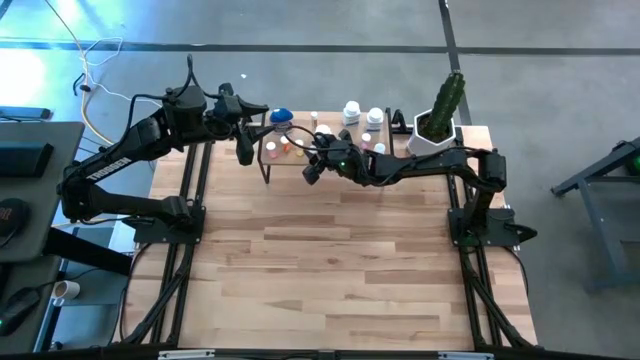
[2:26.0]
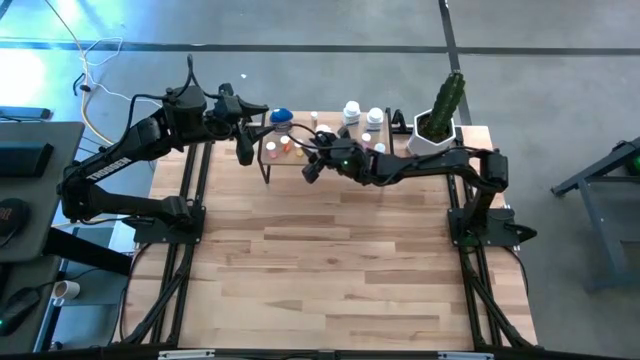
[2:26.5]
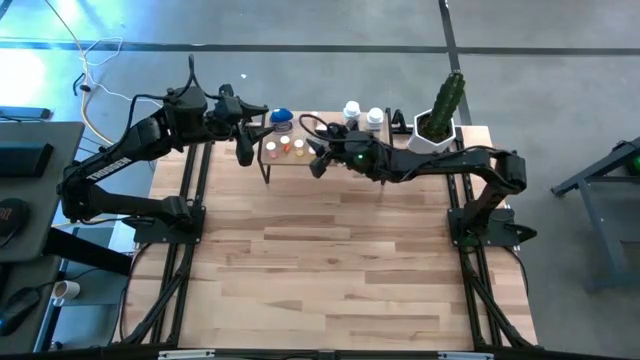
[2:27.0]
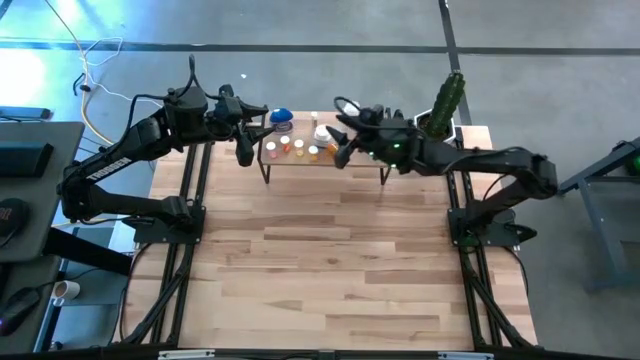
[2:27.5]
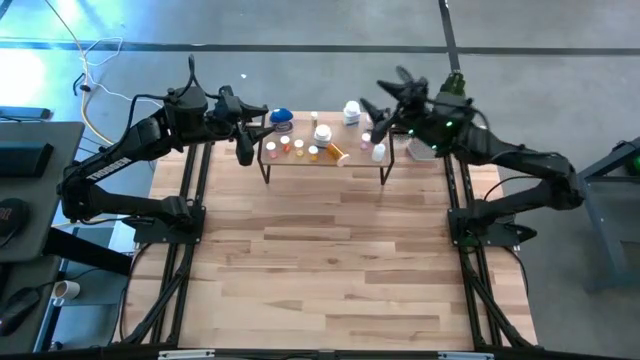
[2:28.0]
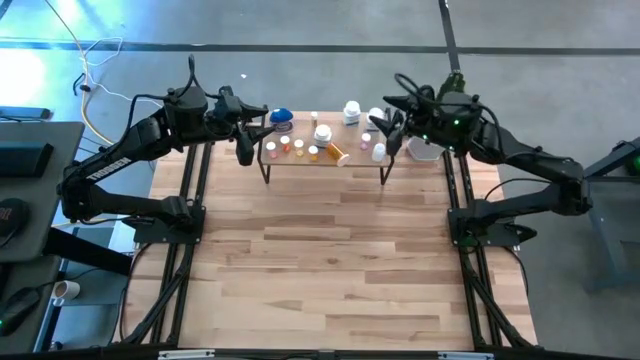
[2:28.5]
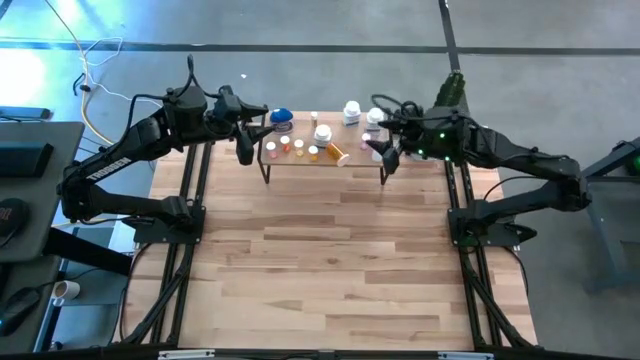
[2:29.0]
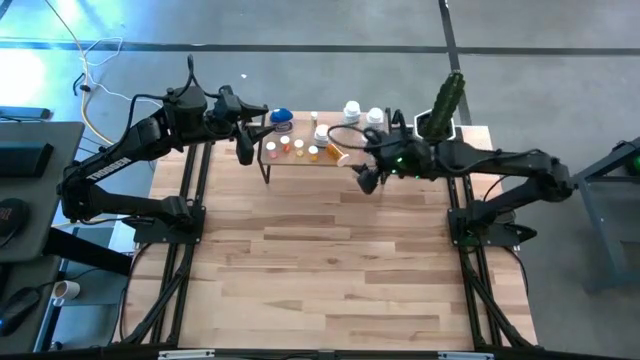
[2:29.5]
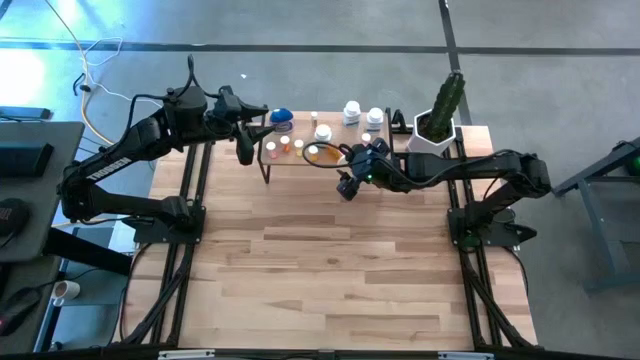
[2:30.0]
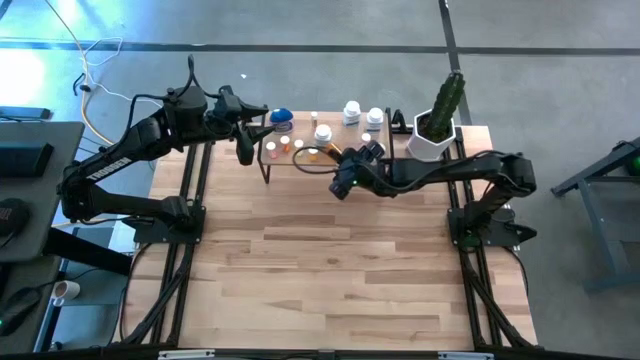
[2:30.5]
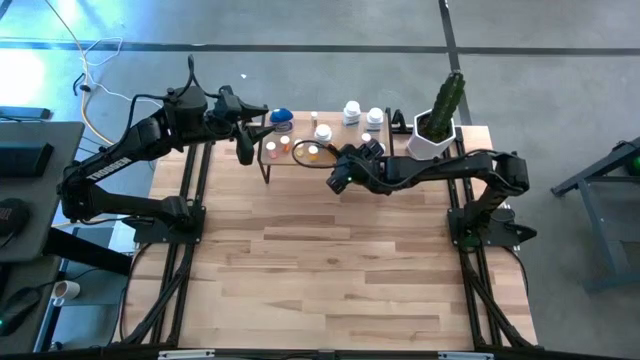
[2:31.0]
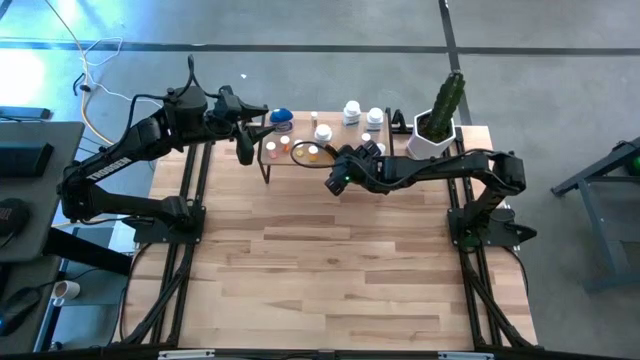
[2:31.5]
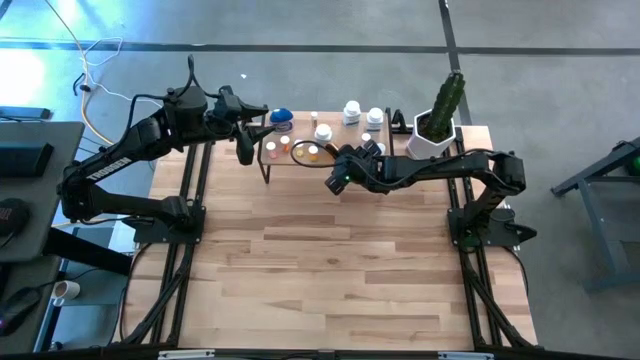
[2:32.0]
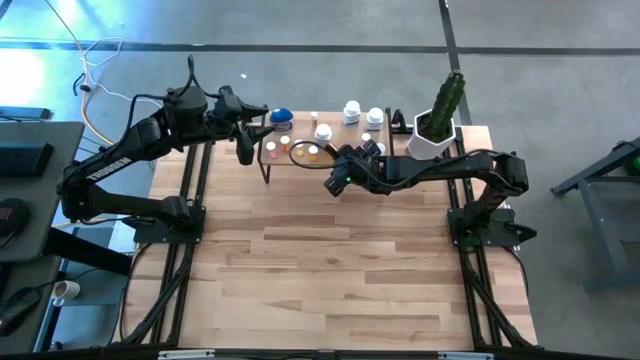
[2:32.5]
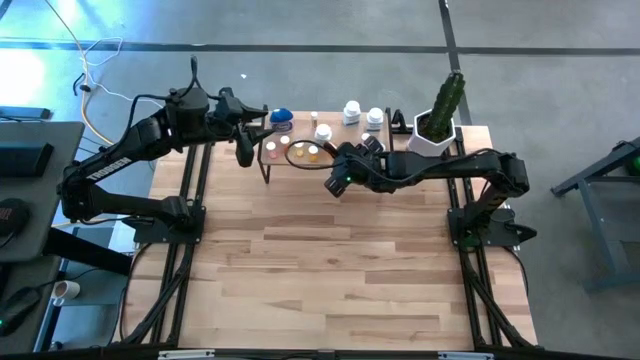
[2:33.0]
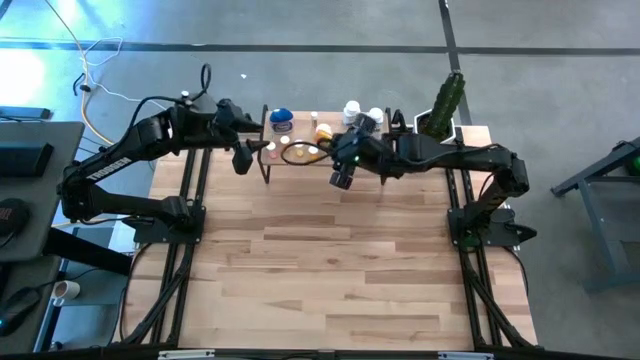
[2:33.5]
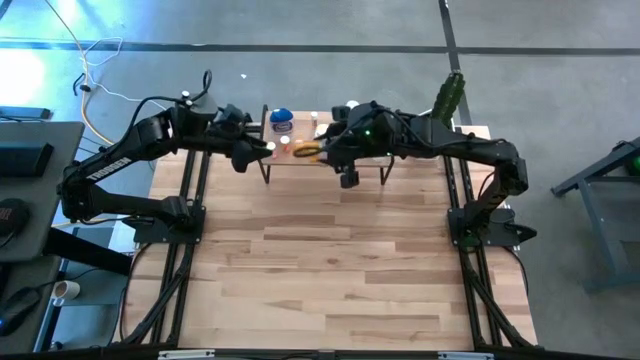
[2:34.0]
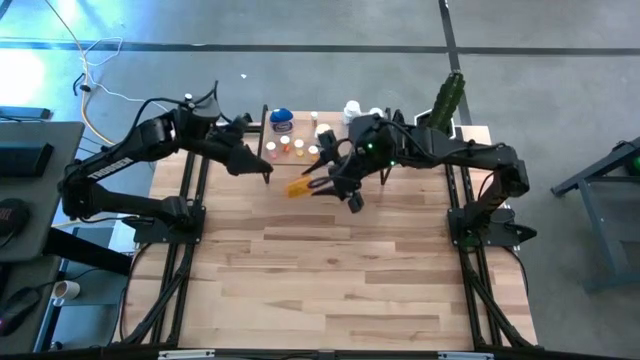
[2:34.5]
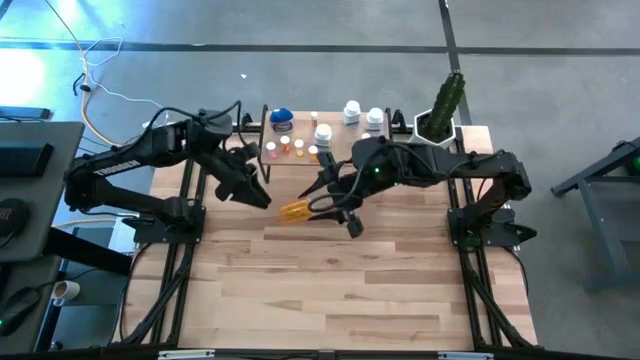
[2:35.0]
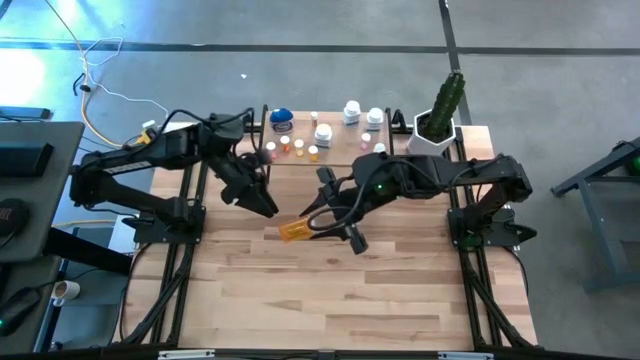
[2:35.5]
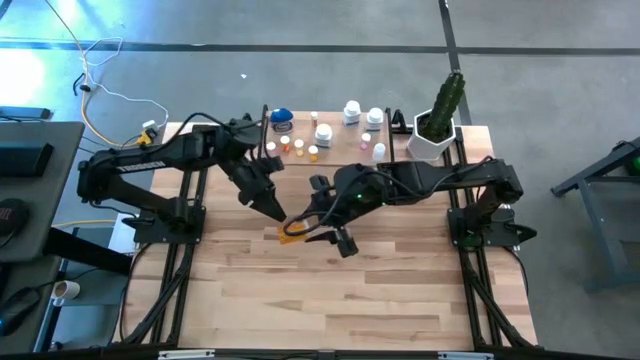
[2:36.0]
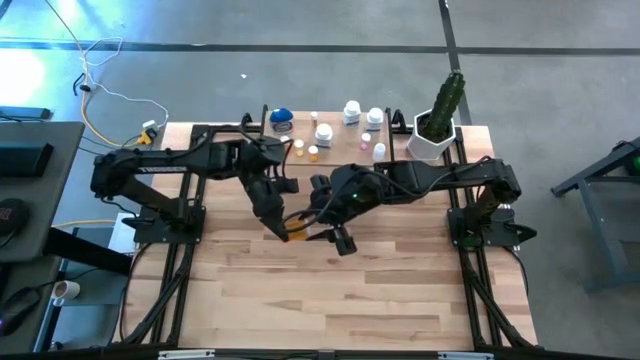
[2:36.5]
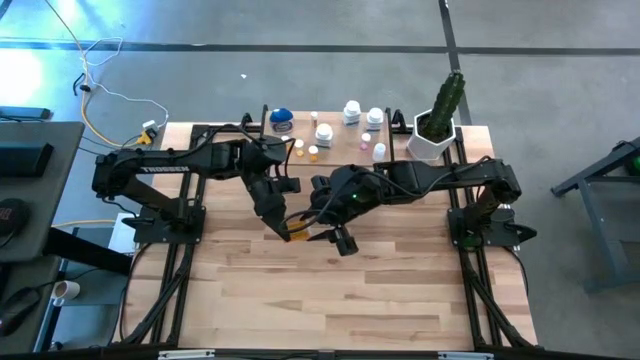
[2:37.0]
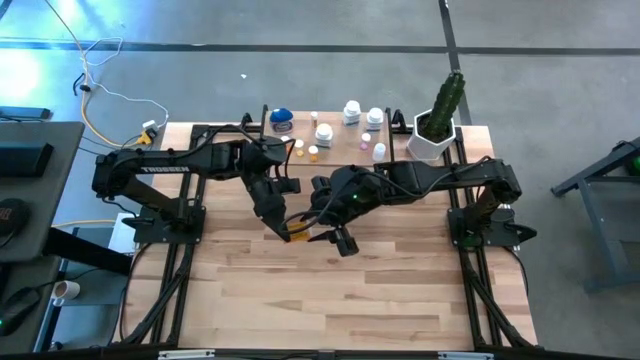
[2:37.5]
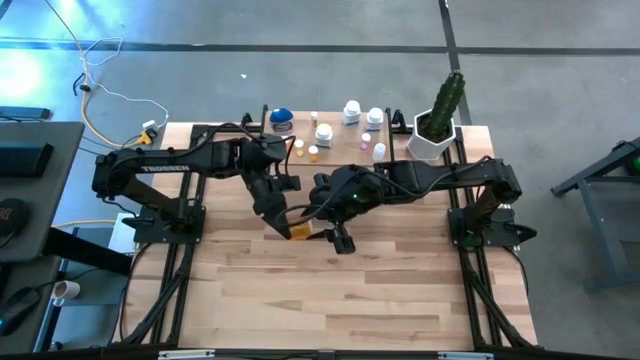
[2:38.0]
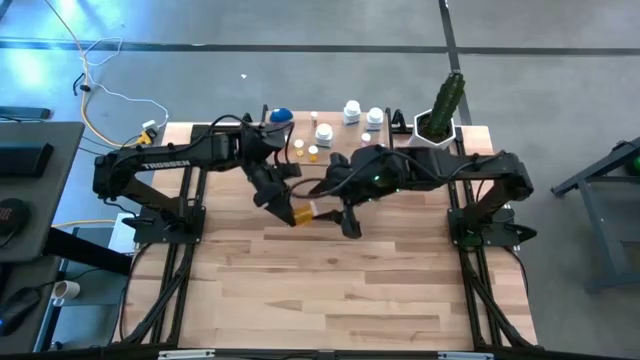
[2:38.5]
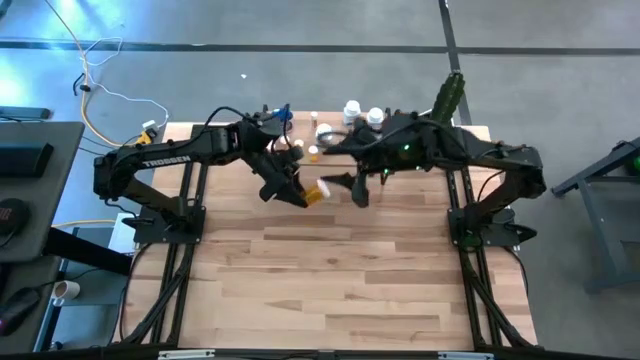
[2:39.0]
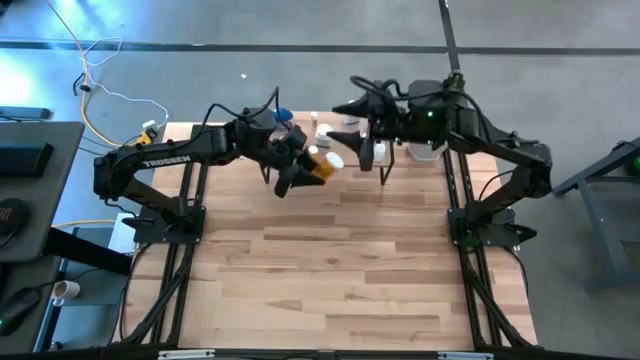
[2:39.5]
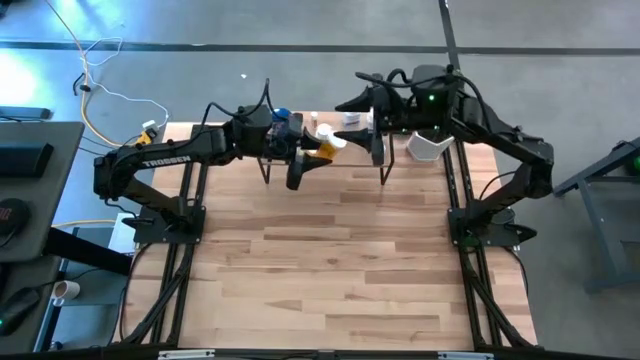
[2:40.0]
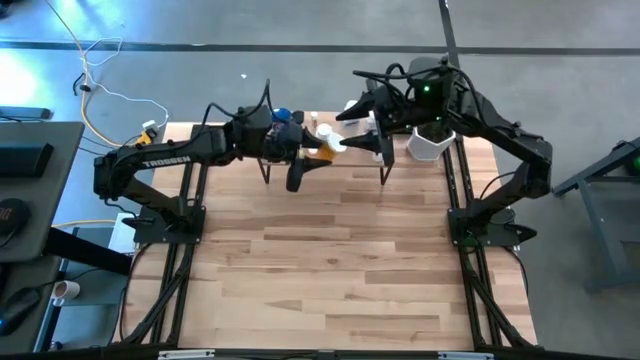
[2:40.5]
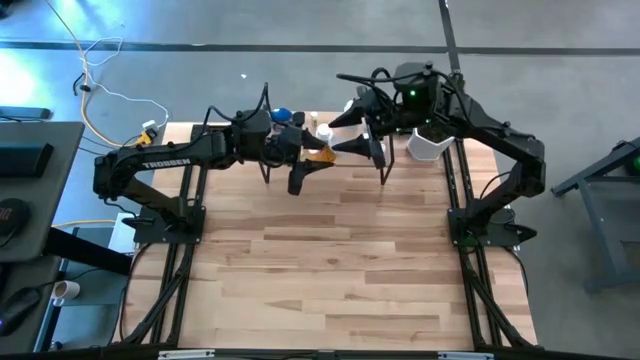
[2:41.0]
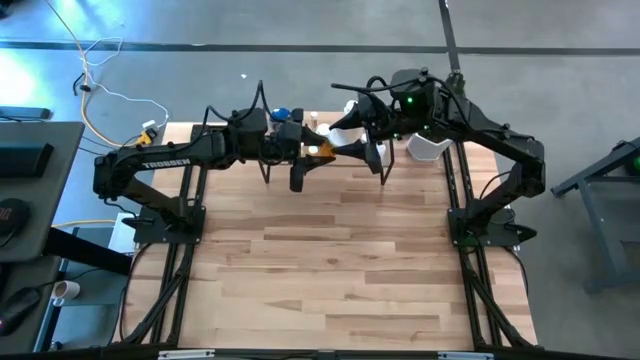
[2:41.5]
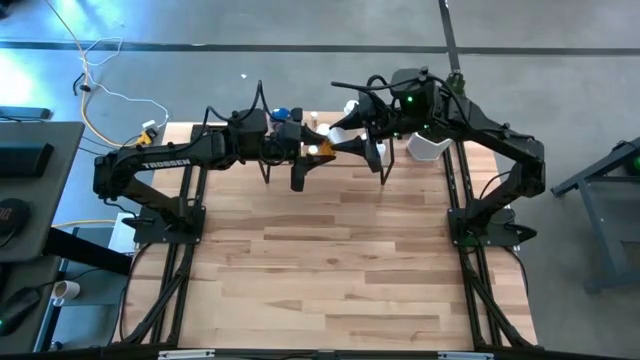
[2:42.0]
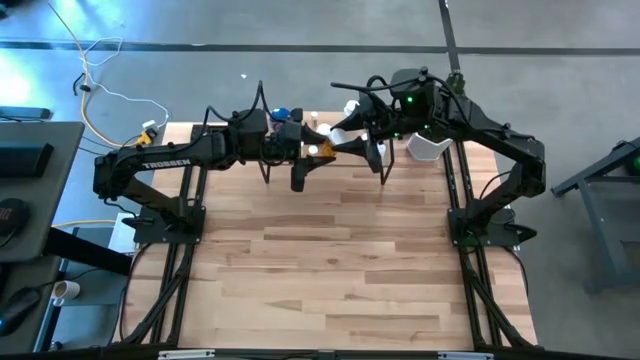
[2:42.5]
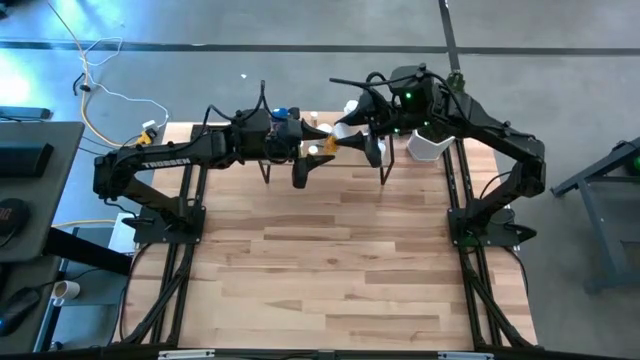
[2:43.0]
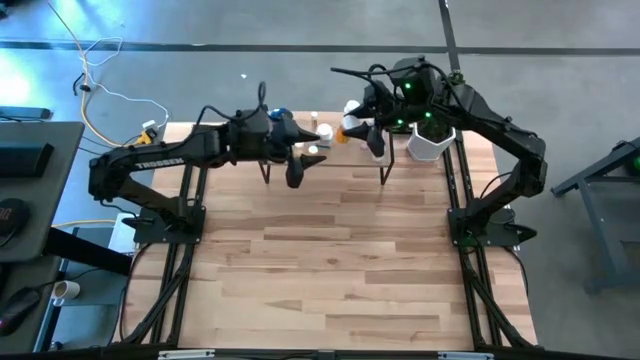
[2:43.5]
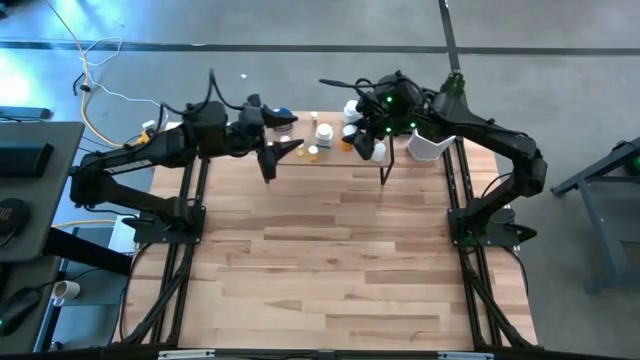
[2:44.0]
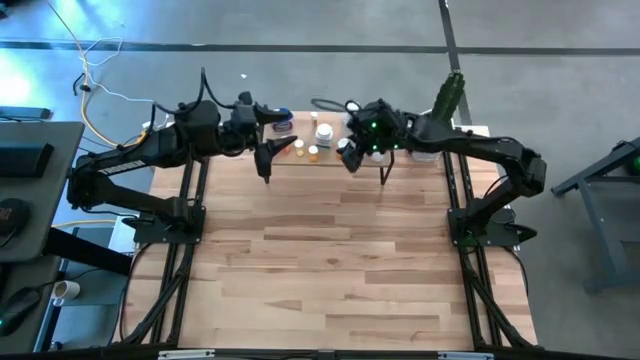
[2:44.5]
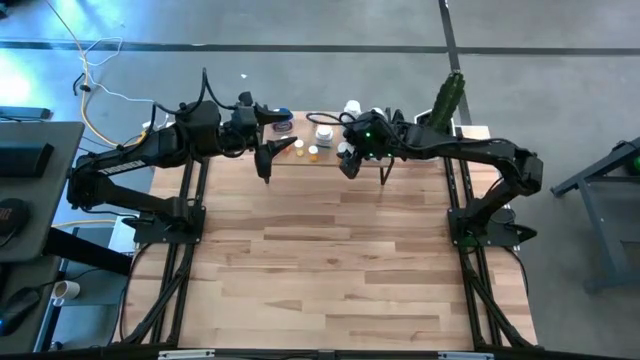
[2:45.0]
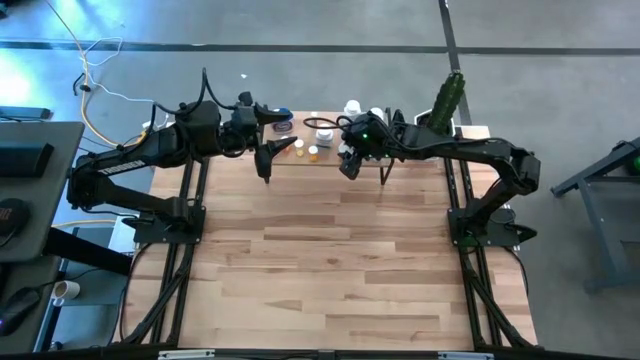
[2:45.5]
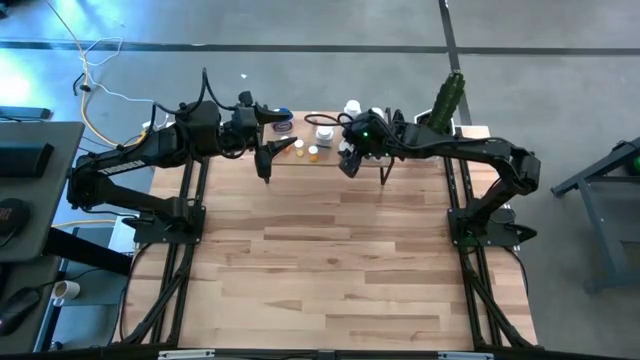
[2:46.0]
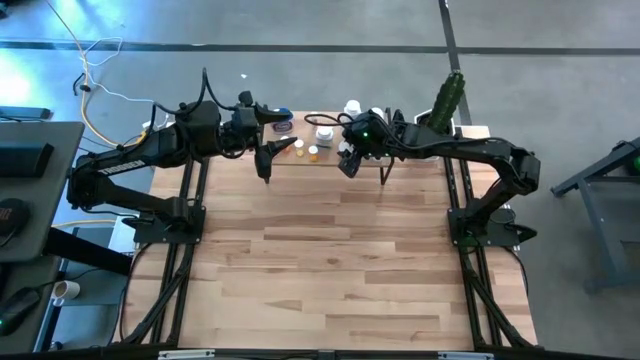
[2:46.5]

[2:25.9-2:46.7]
Task: Pick and place medicine bottles onto shelf by color
Adjust the orange pill bottle on the shelf
